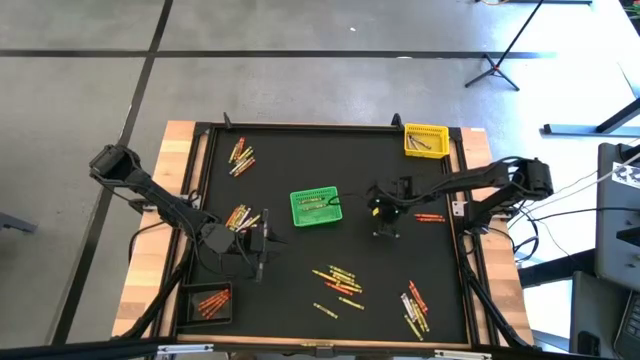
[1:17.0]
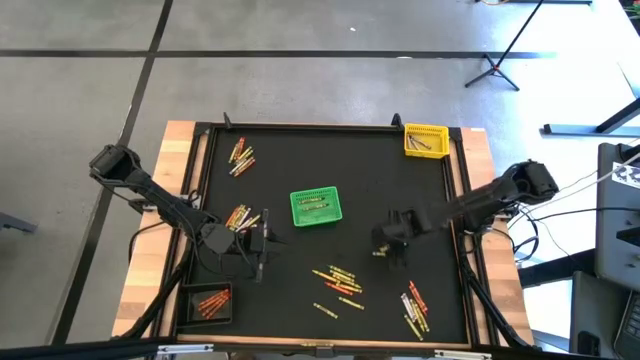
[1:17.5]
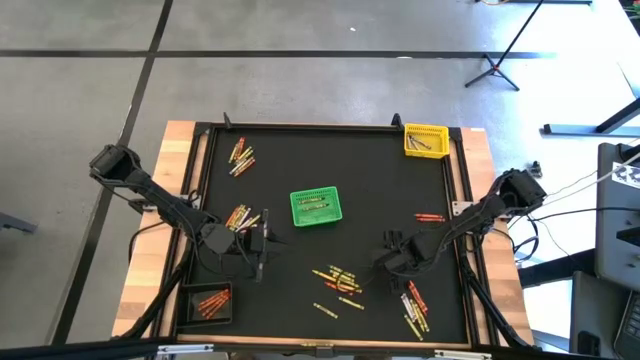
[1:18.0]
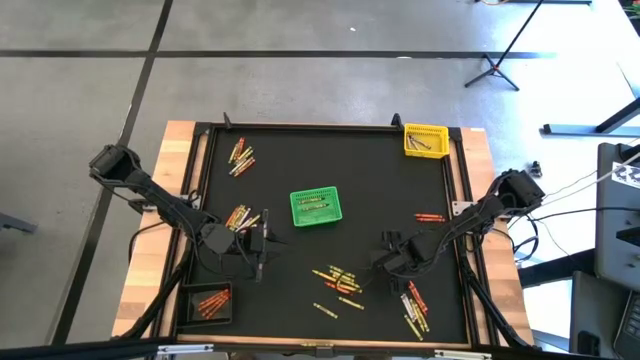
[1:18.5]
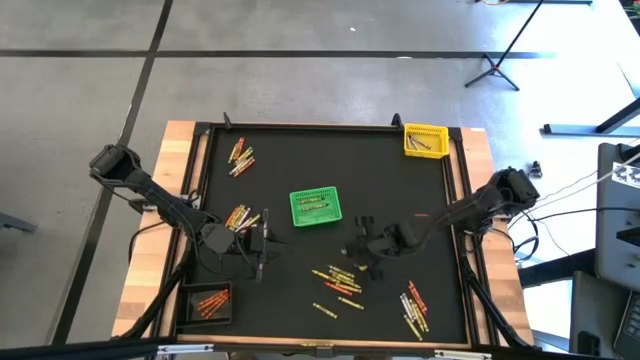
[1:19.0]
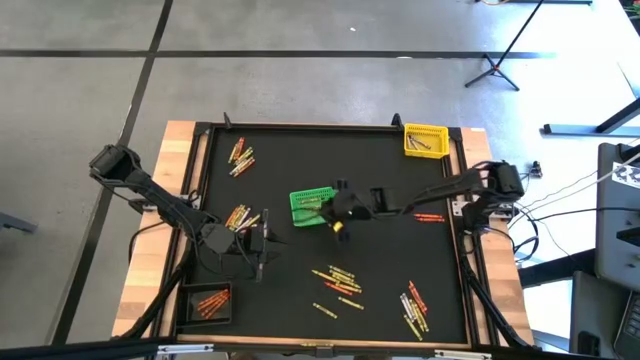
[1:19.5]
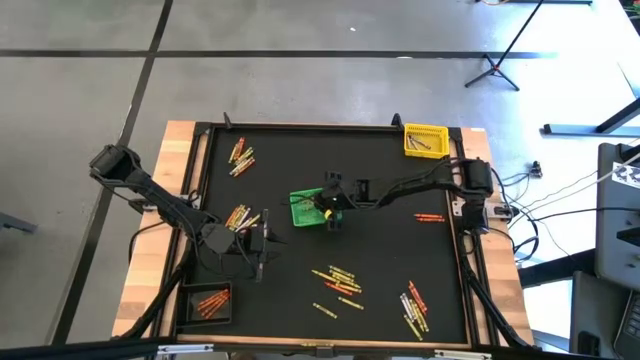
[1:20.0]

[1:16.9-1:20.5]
Task: Sort crayons
Put the green crayon into the green bin

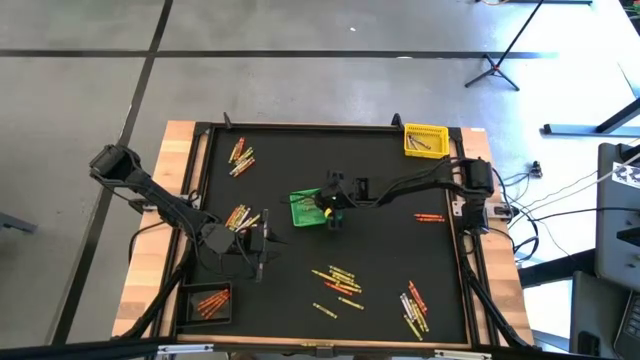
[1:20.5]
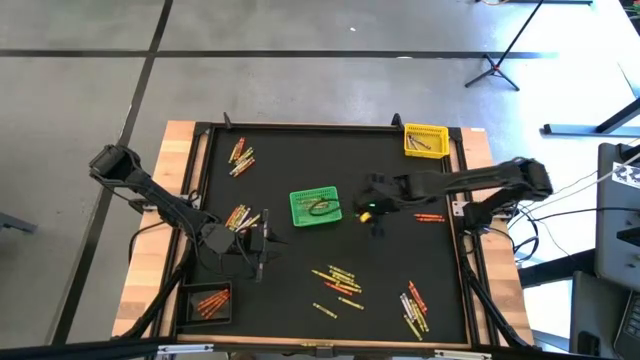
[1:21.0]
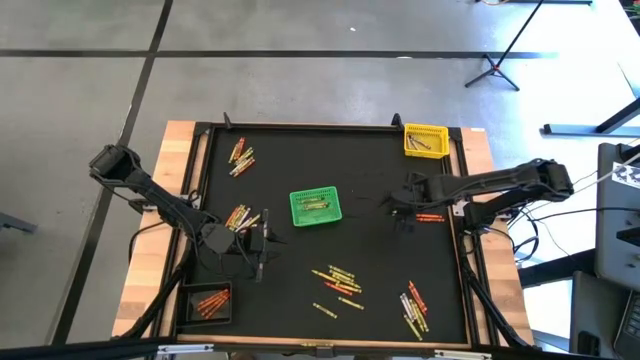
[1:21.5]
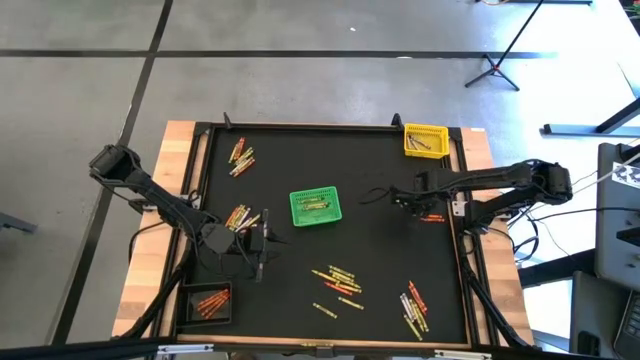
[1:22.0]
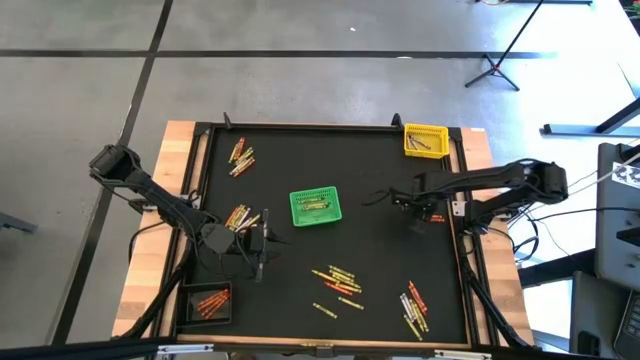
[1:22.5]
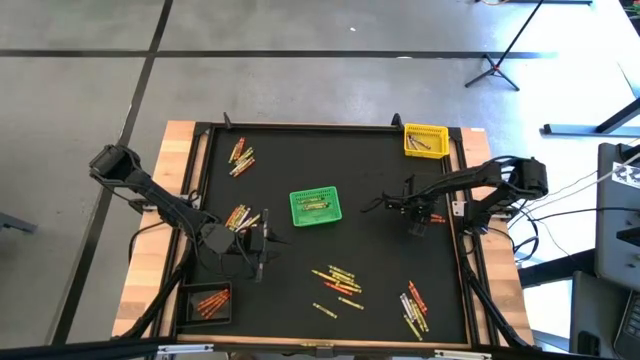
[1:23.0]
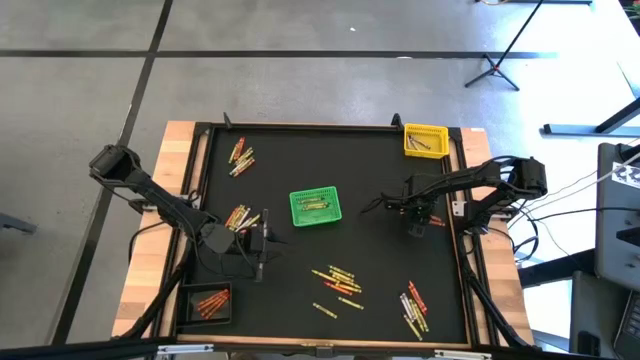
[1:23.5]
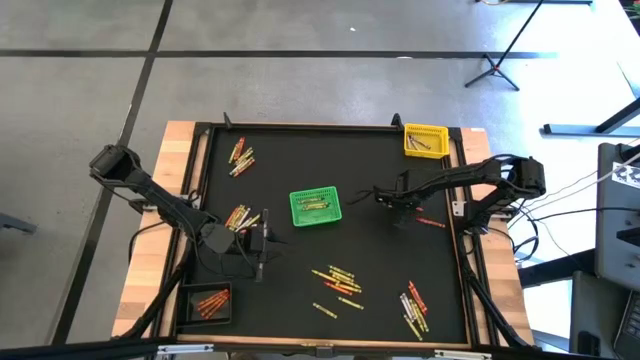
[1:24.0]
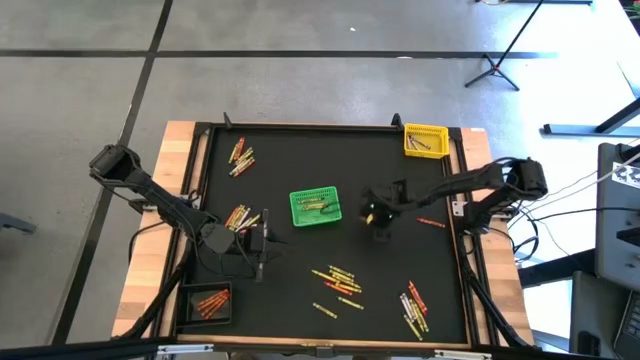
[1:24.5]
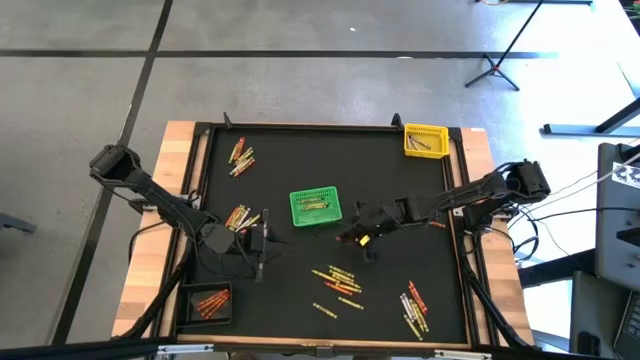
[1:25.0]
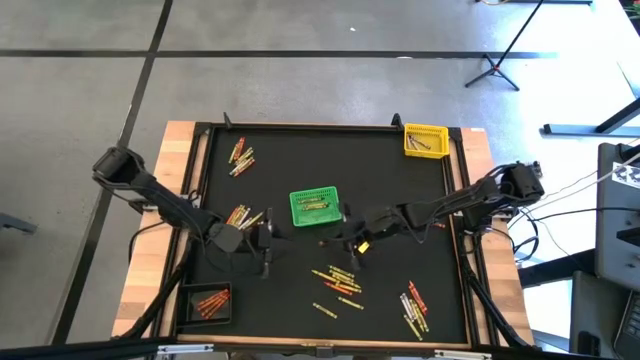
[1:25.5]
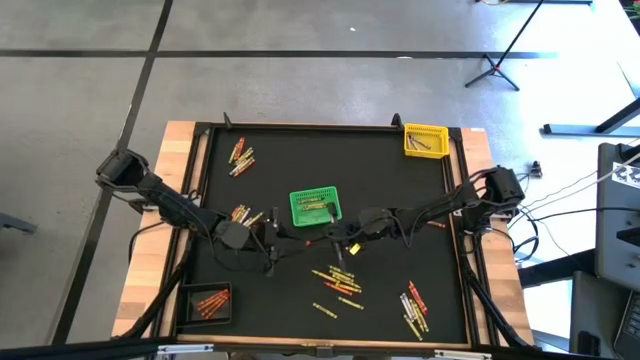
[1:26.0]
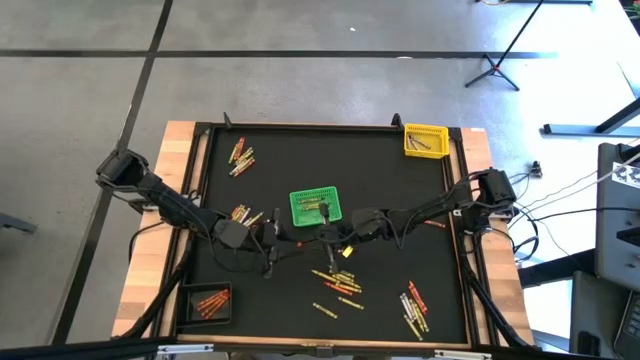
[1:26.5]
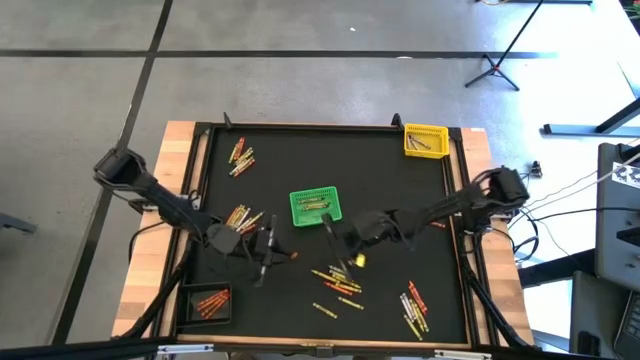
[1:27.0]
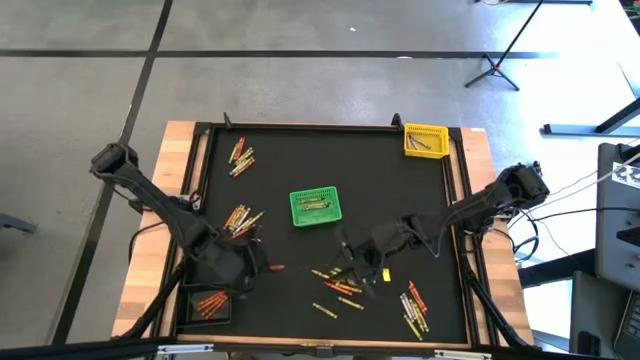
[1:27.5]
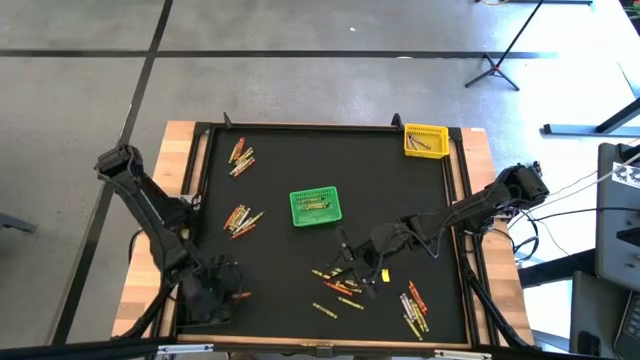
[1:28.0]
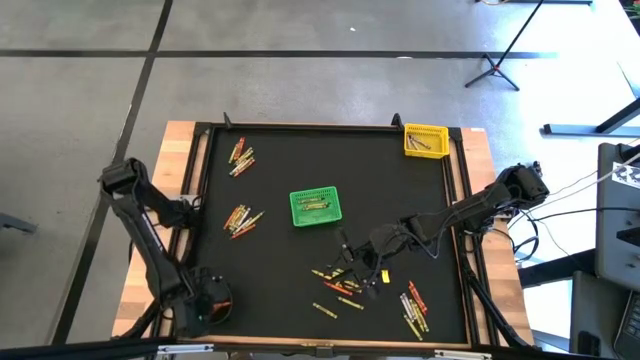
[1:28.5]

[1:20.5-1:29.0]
Put the orange crayon into the black bin

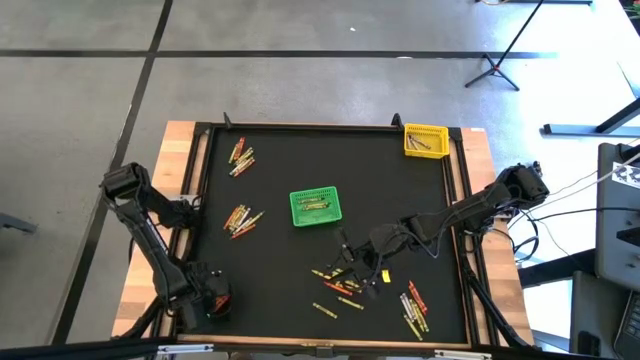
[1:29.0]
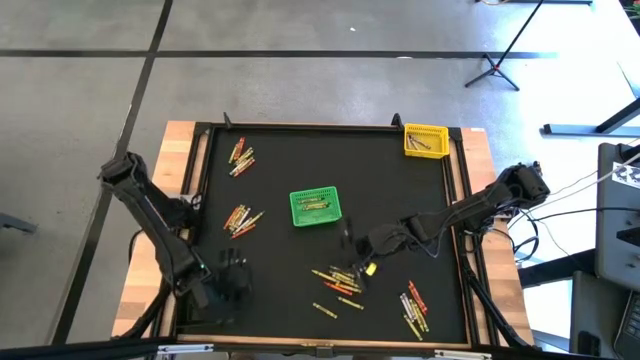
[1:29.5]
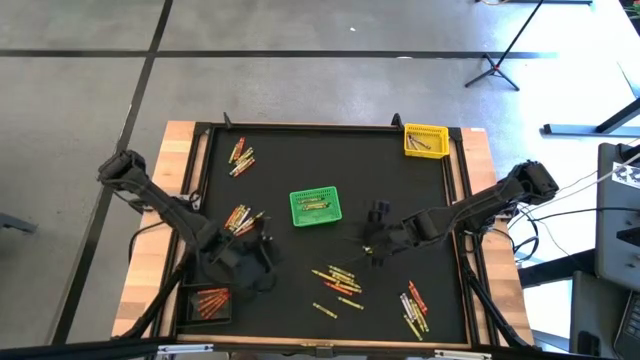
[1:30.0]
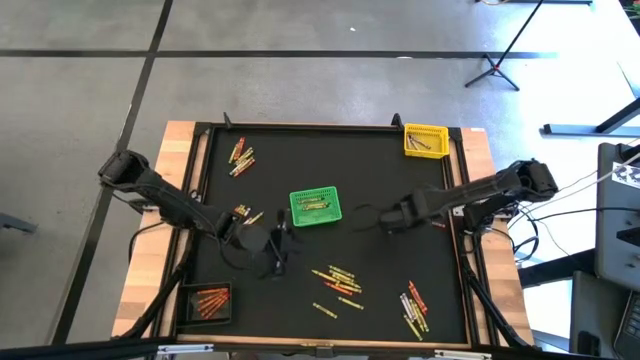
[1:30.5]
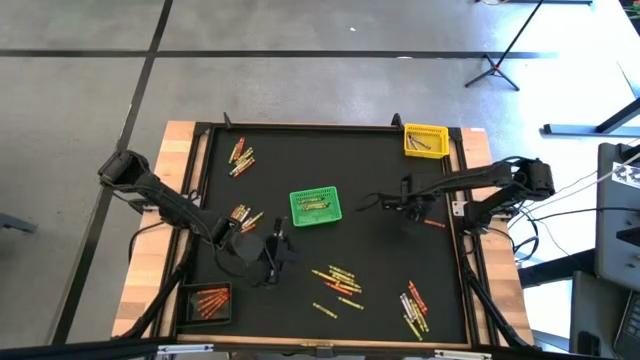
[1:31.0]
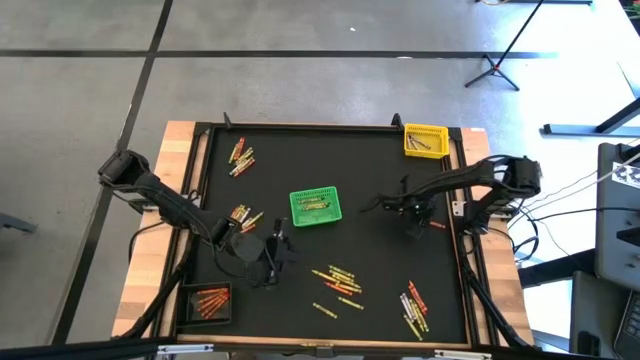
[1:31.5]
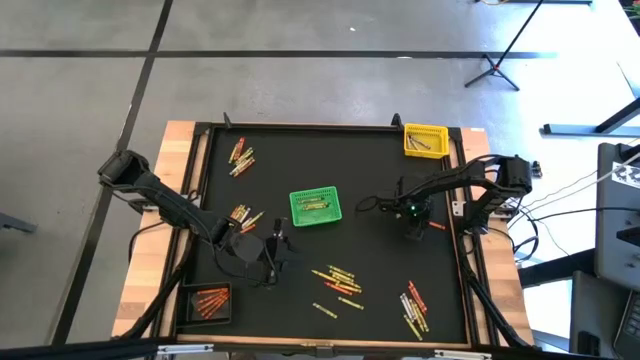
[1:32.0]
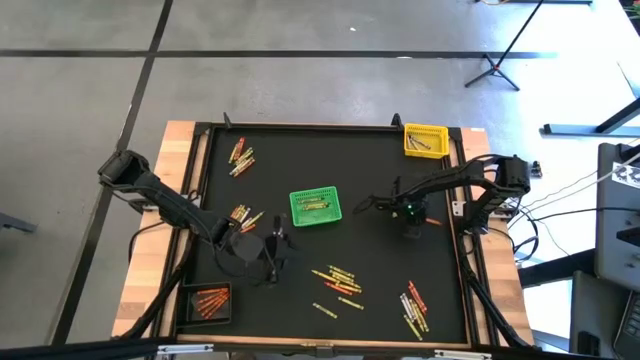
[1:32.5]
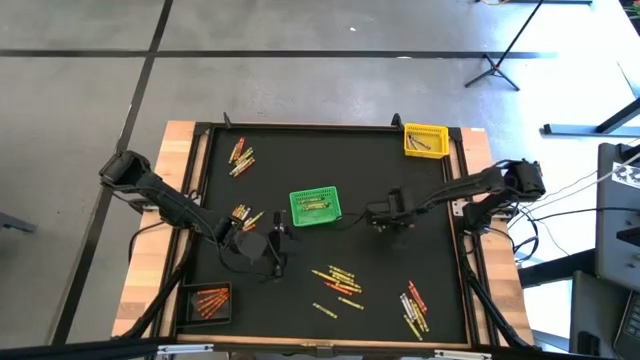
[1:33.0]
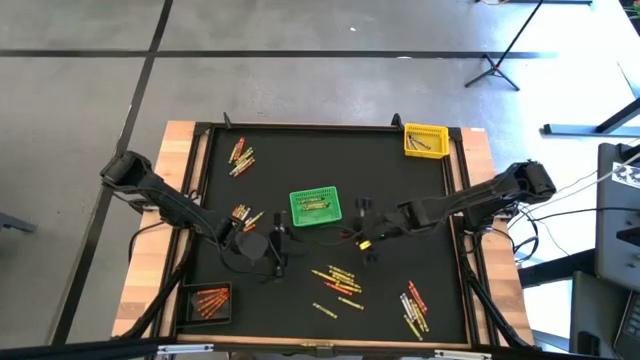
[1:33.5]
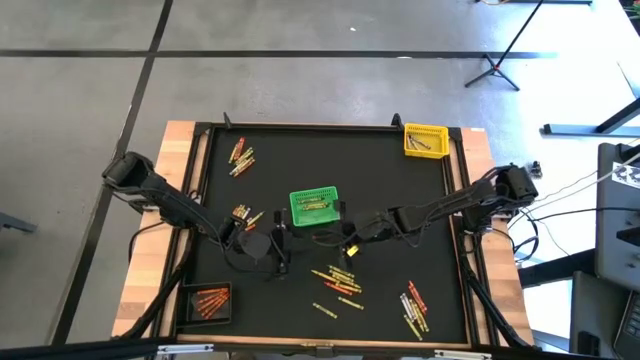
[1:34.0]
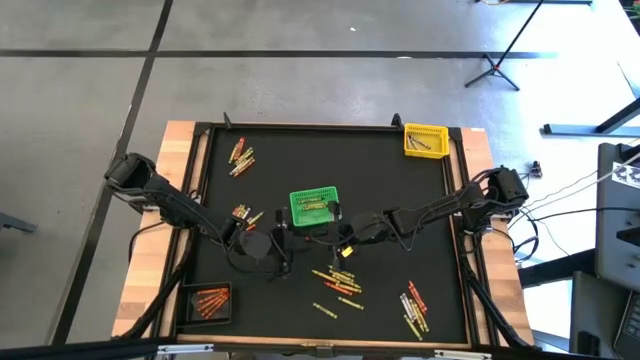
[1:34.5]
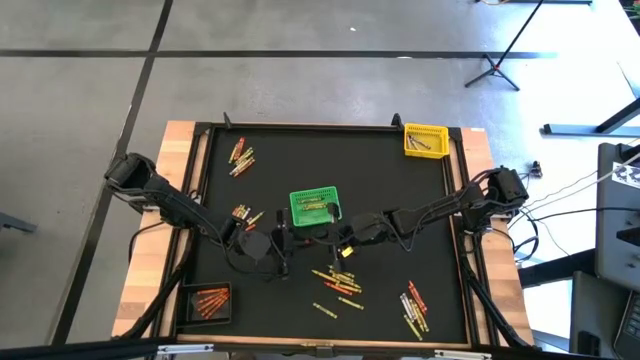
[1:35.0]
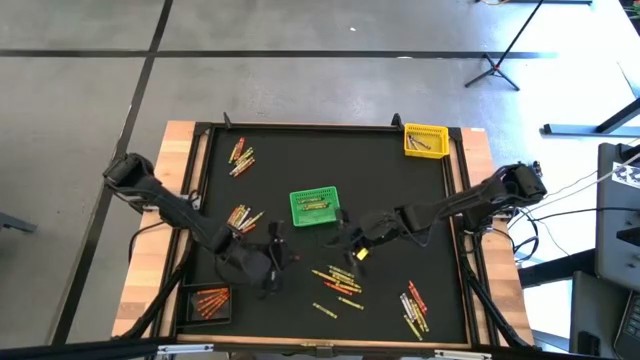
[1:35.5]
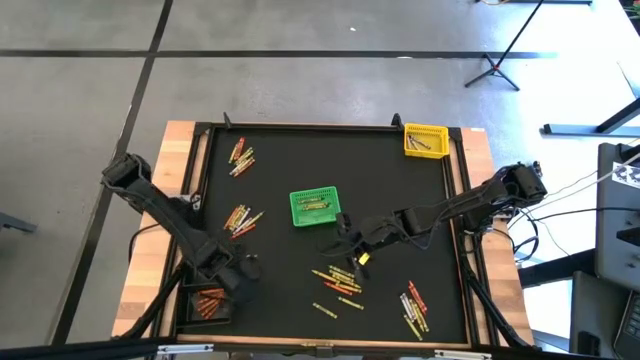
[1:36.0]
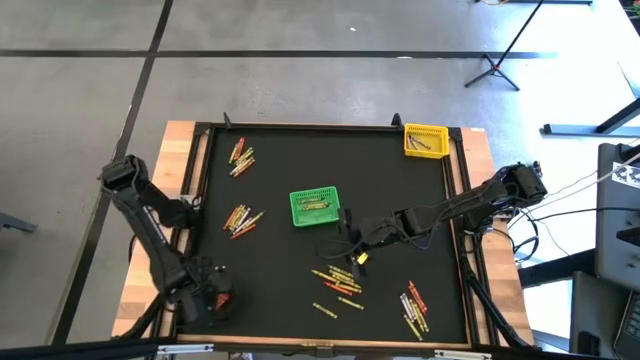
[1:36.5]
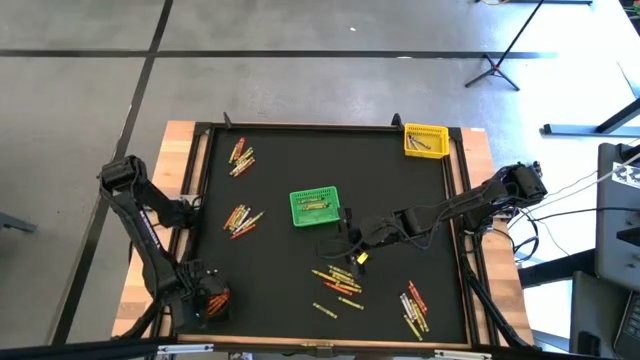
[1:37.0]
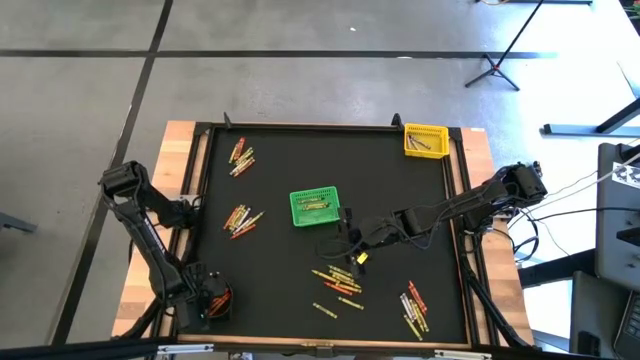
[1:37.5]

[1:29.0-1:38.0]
Put the orange crayon into the black bin
